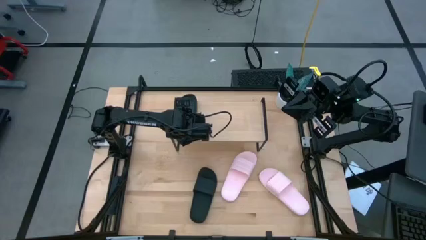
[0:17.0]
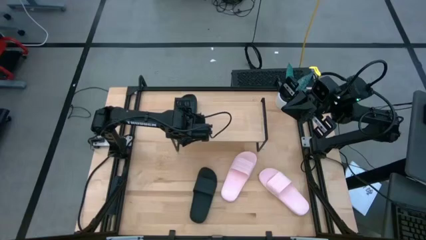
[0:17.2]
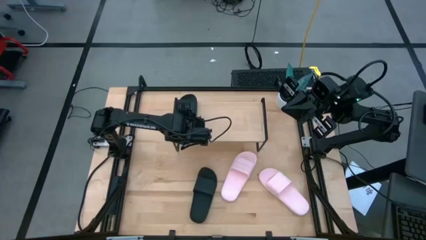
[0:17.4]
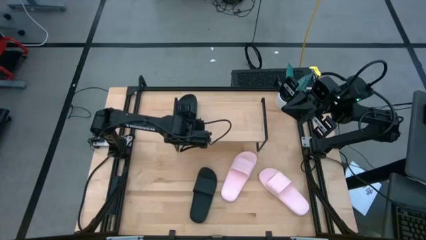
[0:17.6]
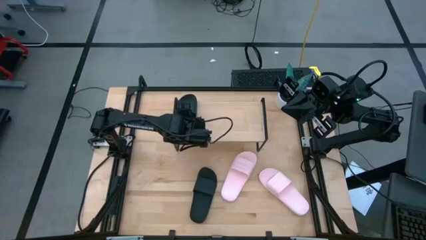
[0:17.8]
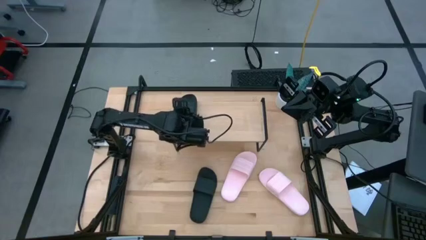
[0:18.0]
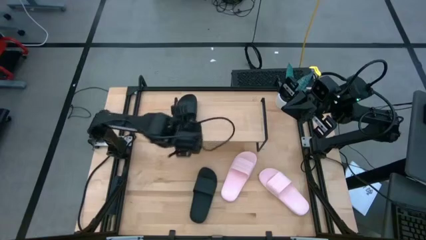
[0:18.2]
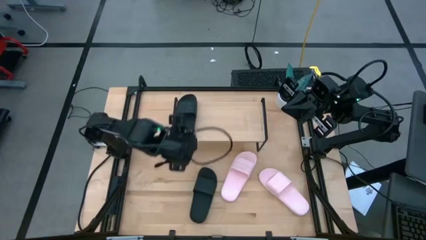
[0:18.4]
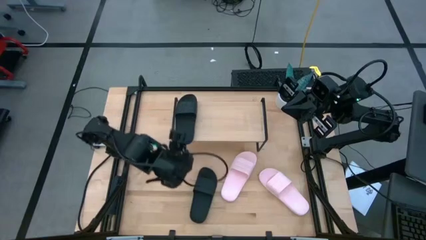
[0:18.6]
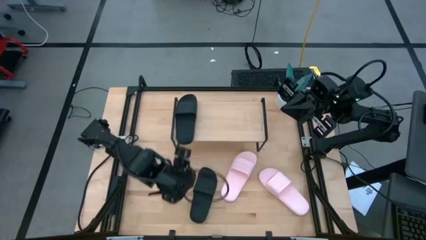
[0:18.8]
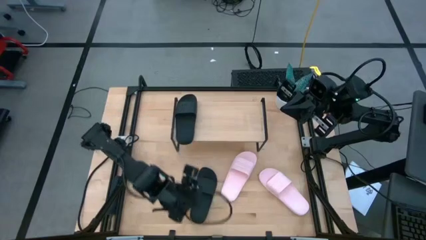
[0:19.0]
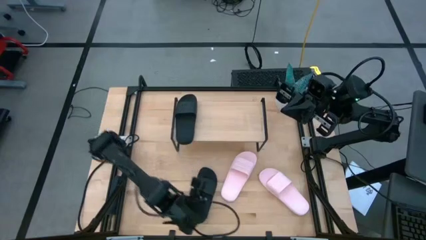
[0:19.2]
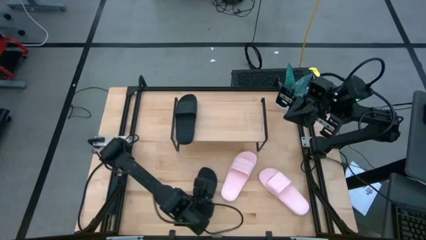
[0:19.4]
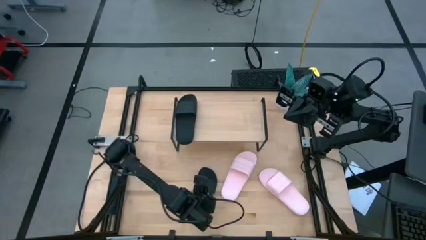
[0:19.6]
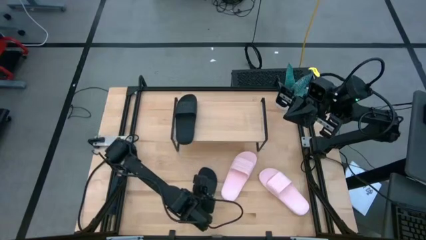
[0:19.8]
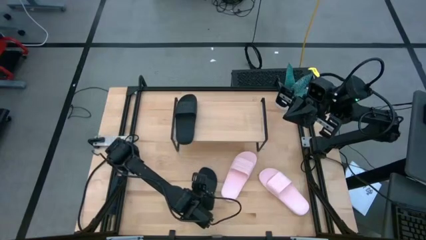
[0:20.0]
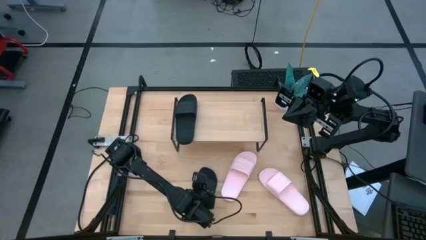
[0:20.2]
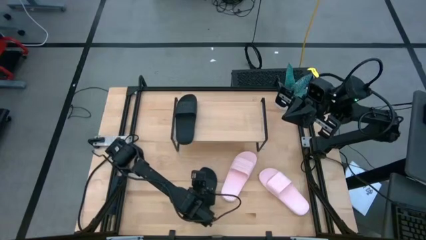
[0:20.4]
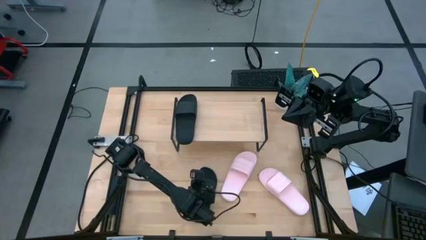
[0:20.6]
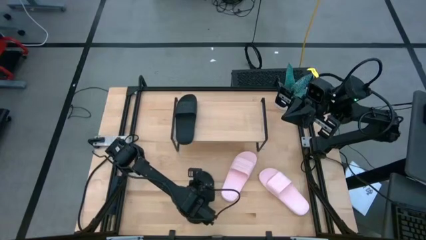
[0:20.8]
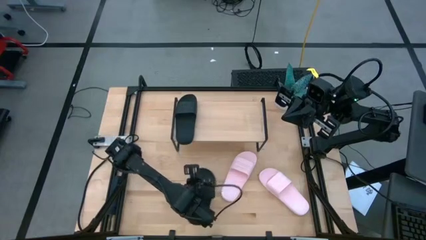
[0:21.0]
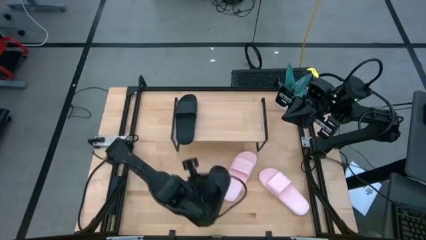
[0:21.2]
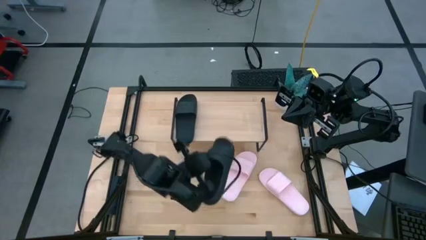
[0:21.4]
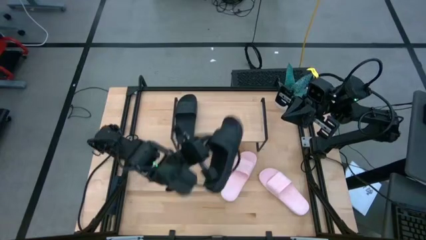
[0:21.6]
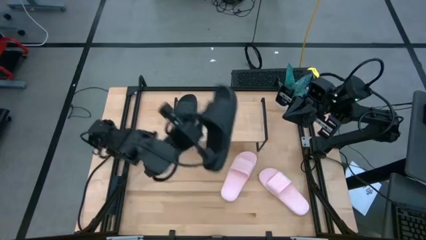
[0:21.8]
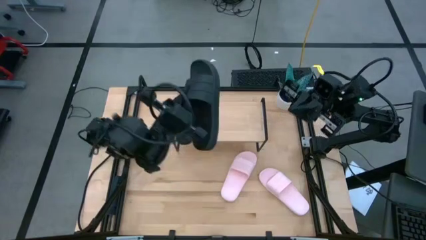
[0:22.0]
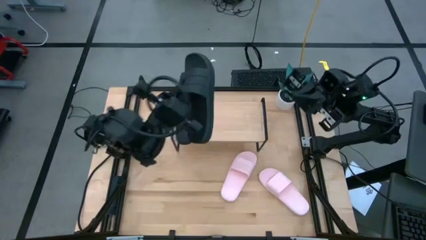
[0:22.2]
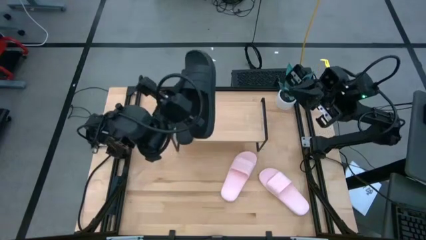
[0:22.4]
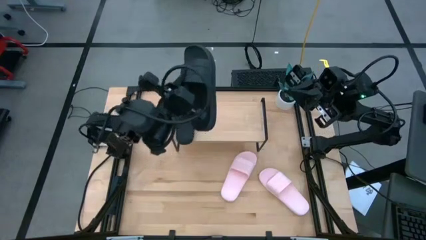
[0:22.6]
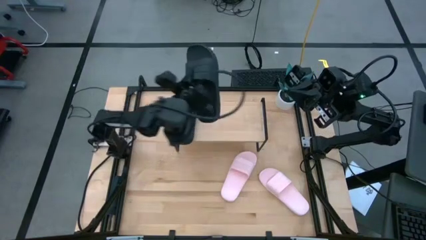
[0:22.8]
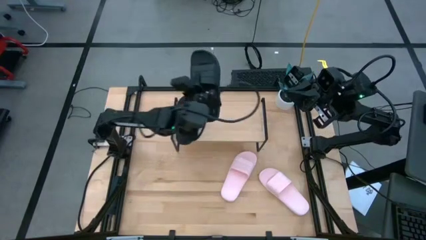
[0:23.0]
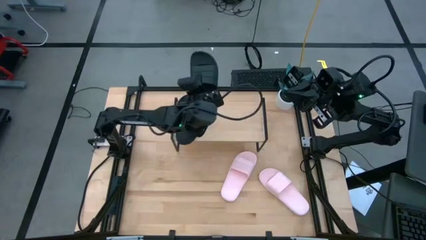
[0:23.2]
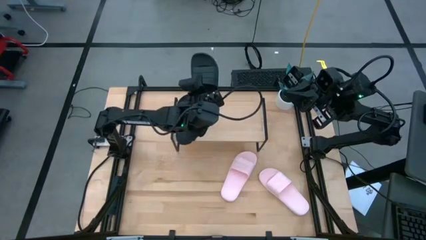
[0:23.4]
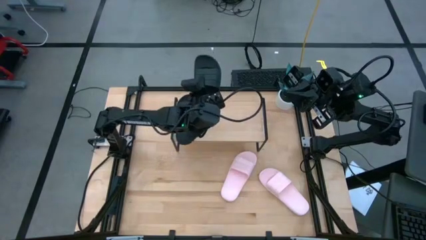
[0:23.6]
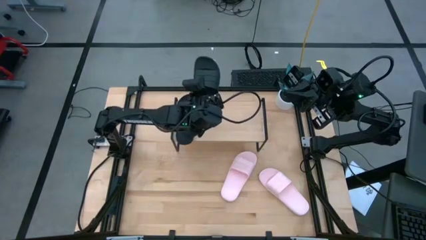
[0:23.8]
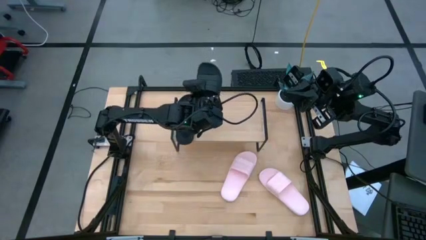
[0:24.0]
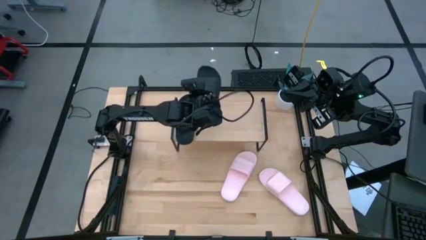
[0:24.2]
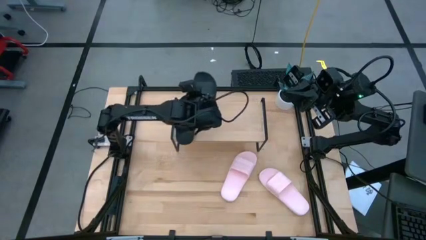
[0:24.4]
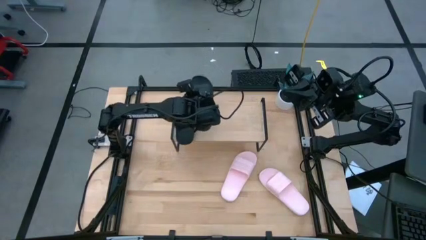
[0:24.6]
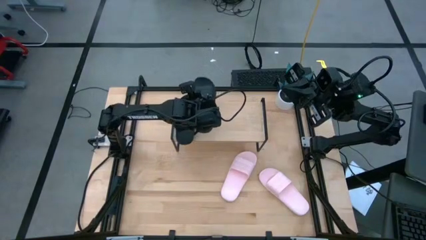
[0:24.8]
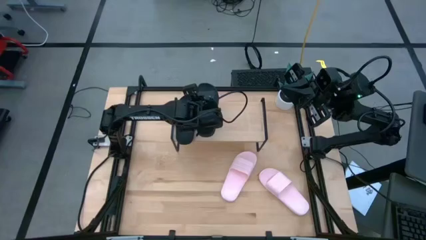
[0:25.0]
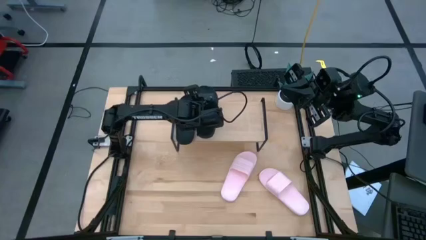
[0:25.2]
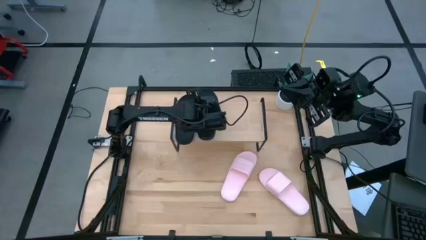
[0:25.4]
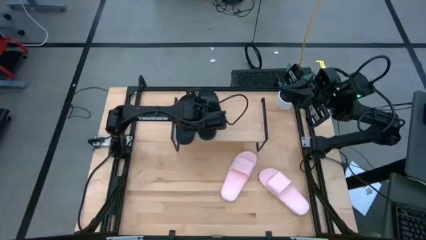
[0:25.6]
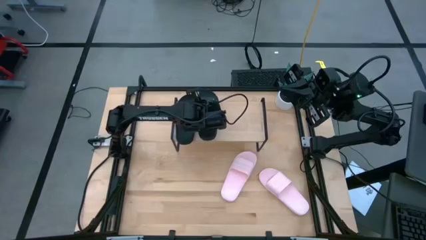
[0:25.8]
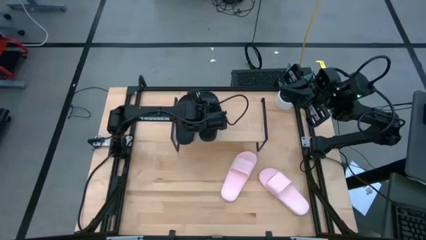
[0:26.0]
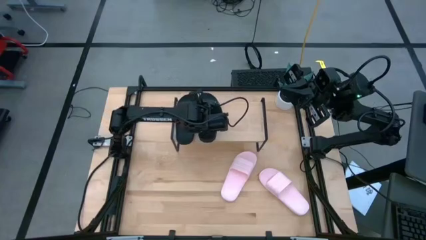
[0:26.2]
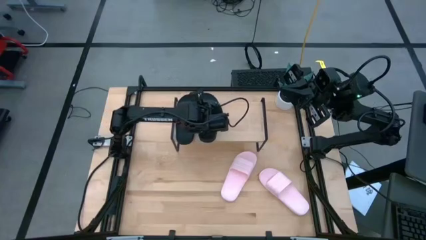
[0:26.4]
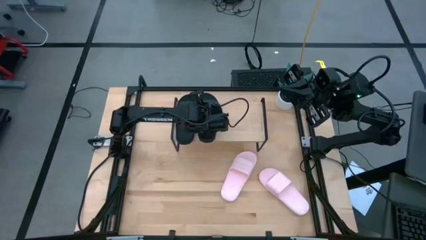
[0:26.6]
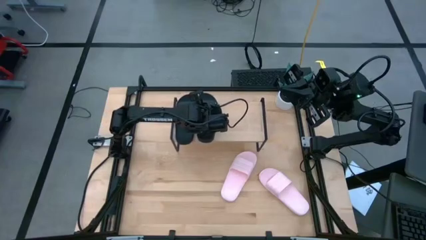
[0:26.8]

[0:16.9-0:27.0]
Task: Pick and place slides into the shelf
Put the black slide next to the black slide on the shelf
